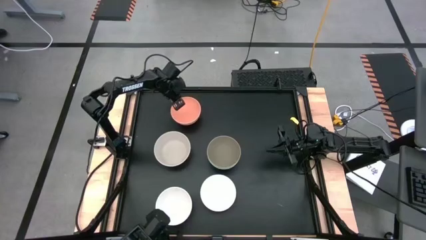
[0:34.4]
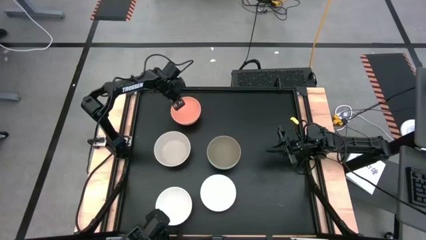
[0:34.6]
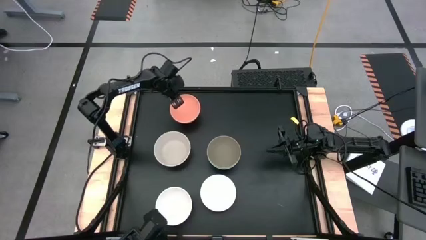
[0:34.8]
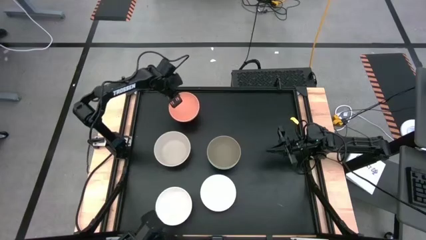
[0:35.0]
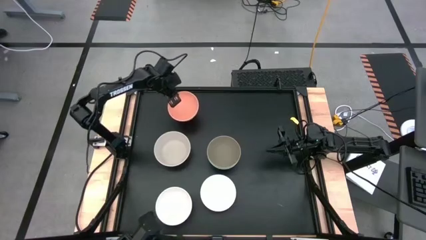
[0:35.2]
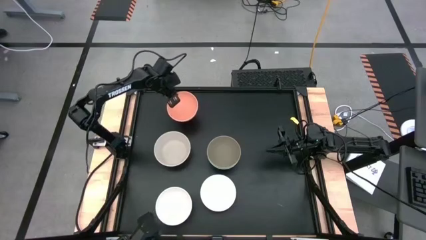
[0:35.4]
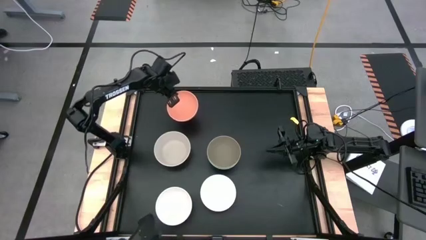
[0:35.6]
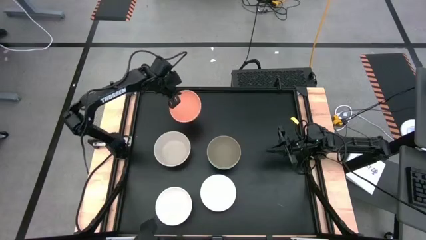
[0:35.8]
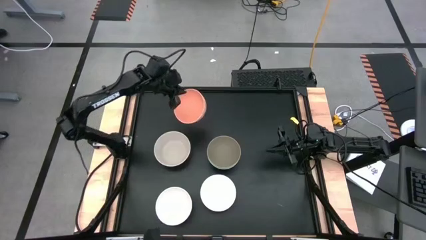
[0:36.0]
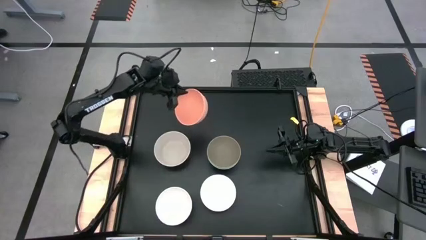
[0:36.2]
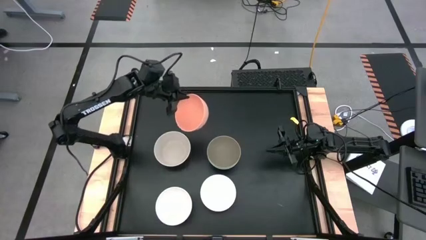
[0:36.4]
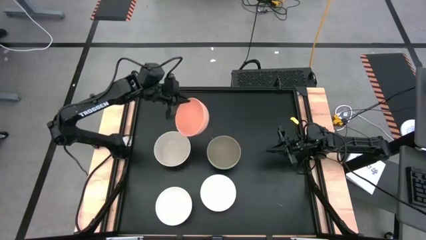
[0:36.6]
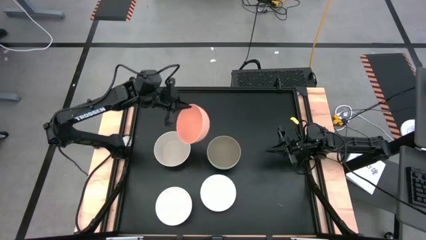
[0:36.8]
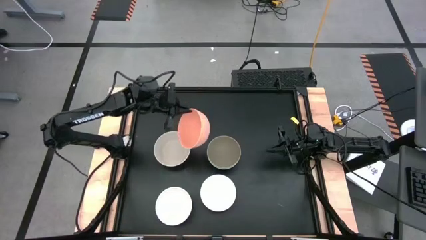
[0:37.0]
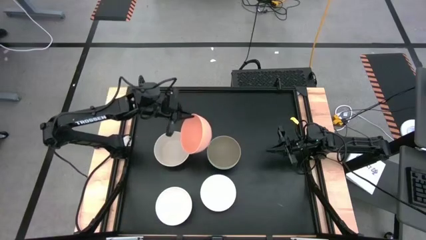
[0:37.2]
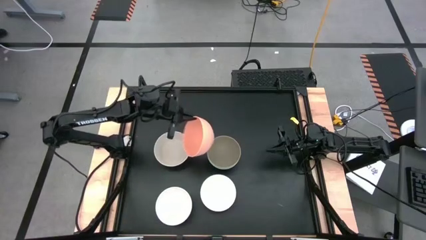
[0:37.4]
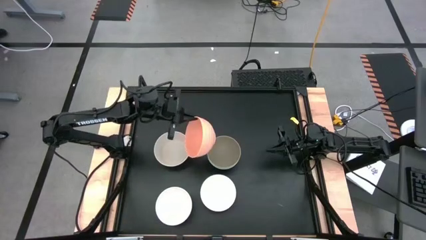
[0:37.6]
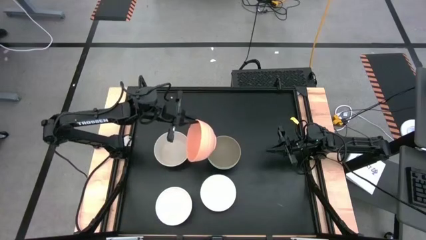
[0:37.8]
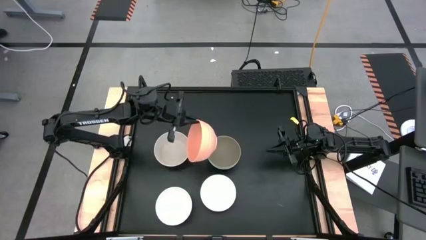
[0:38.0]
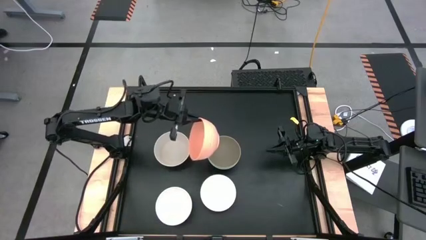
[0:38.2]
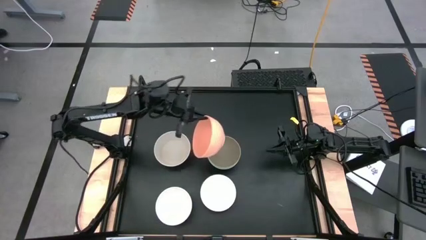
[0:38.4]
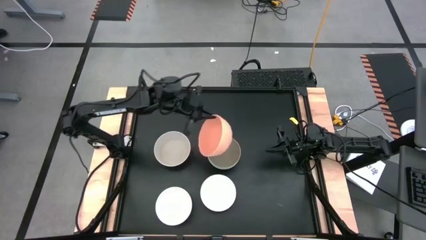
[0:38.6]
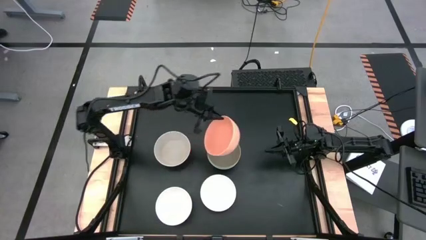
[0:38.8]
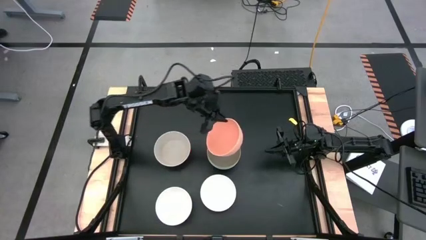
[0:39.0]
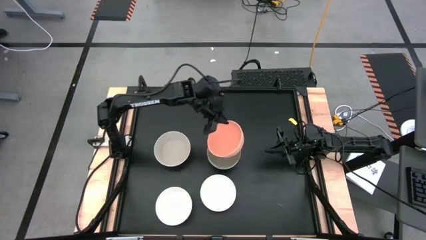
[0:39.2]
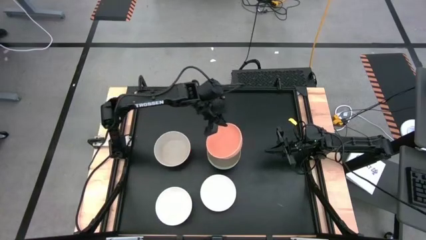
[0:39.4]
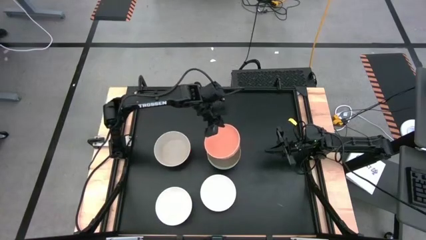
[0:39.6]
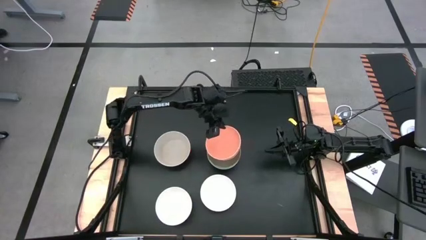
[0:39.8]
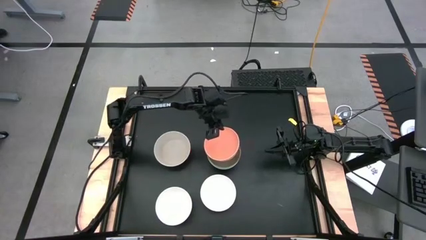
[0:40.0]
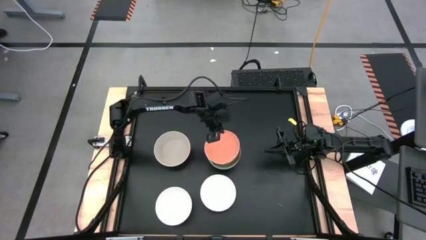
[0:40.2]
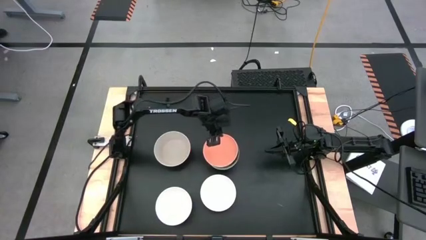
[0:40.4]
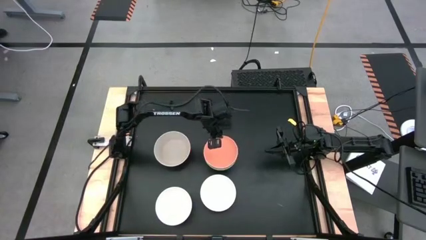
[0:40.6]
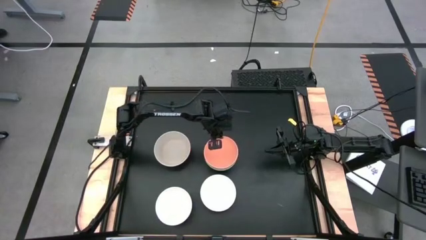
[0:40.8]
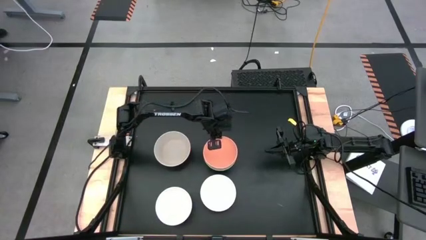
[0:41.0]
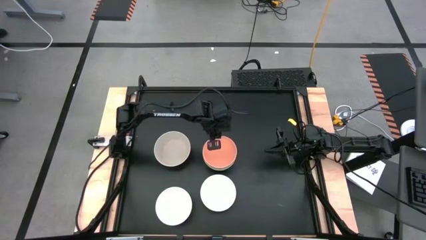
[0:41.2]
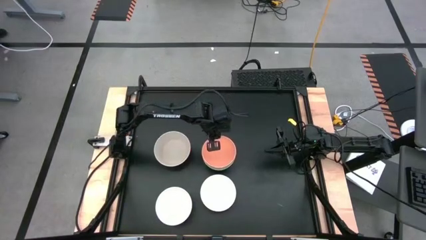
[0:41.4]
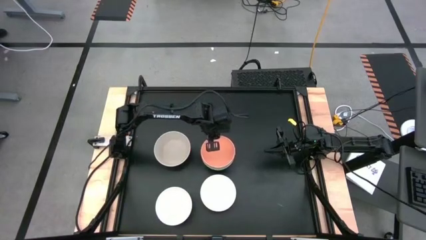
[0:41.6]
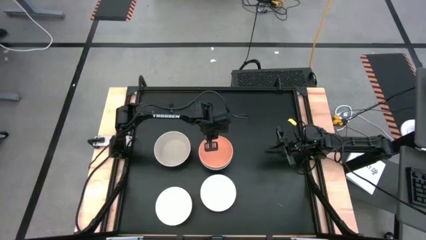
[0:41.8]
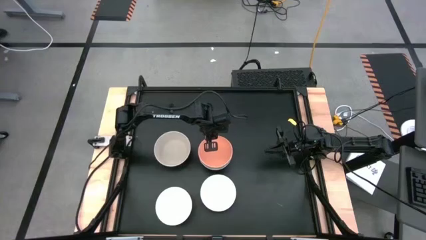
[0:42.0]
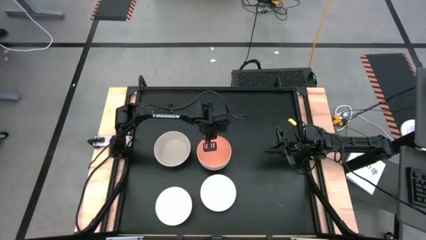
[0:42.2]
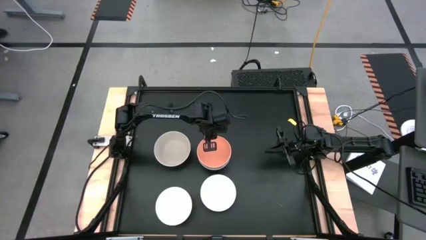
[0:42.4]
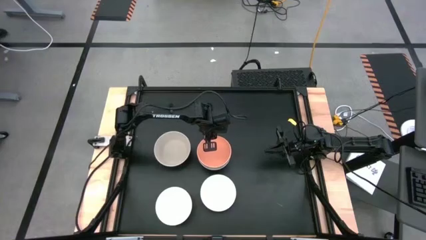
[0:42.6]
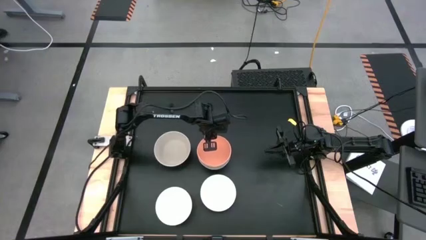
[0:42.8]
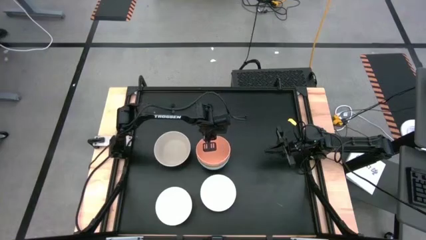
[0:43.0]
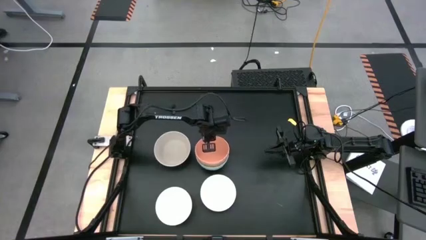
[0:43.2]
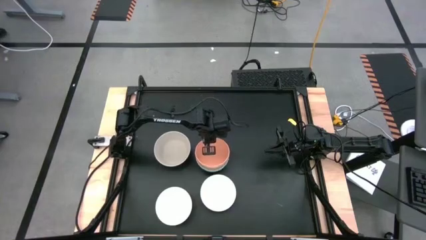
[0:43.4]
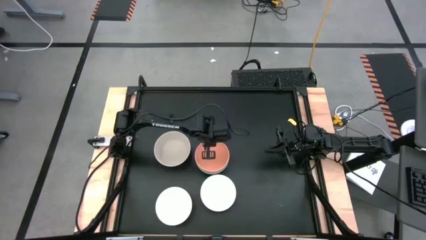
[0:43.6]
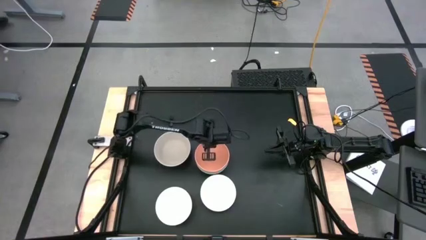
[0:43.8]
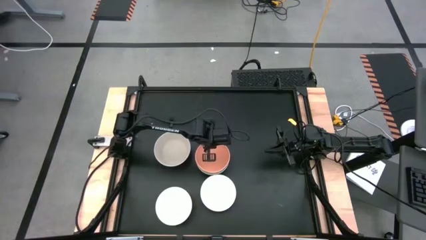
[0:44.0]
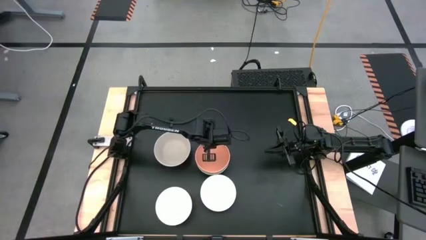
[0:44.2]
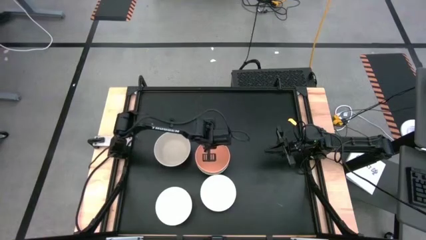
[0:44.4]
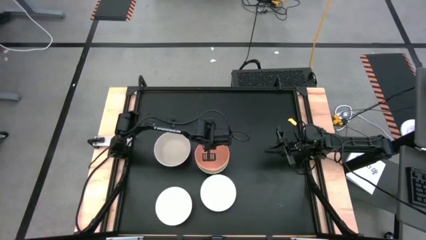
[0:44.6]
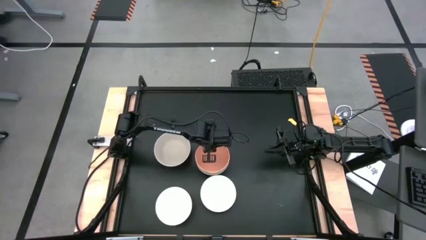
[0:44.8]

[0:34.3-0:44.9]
Task: Nest bowls inside each other
Stack the orange bowl on top of the brown bowl

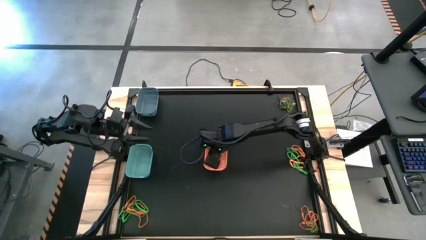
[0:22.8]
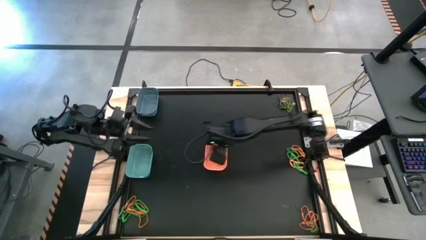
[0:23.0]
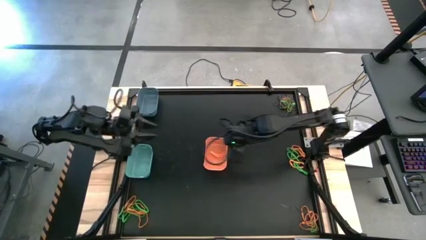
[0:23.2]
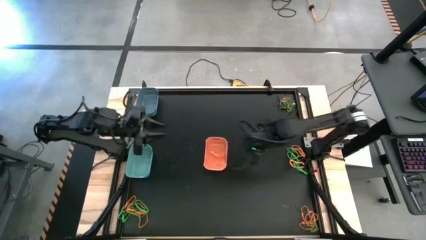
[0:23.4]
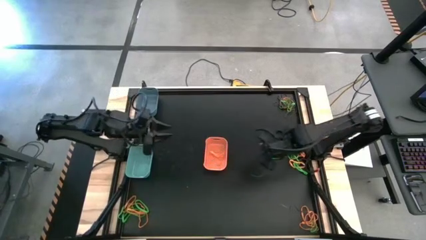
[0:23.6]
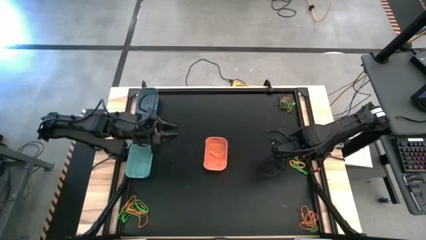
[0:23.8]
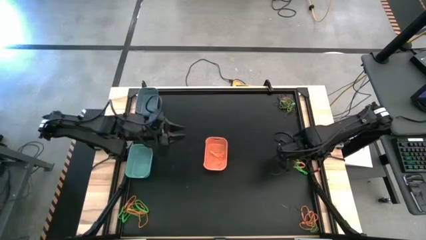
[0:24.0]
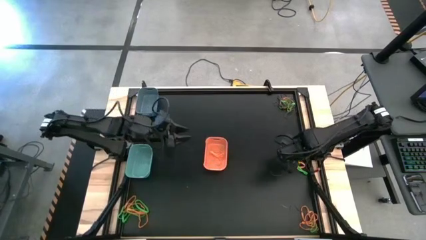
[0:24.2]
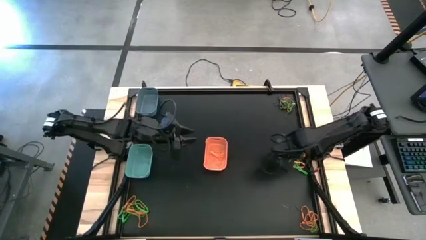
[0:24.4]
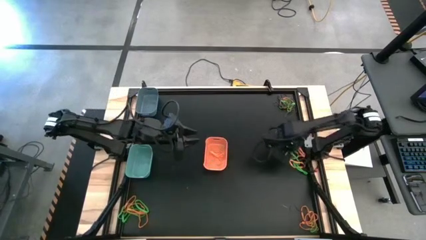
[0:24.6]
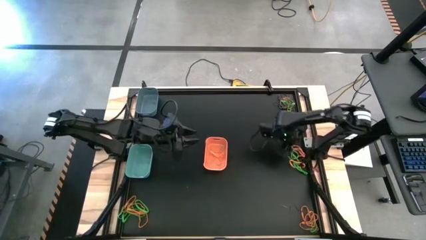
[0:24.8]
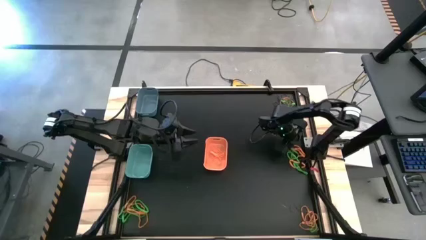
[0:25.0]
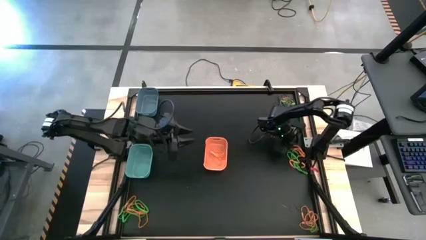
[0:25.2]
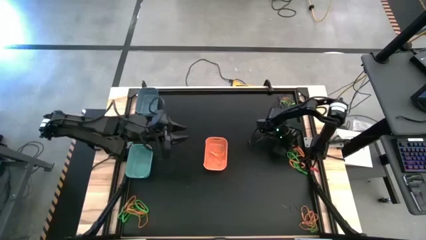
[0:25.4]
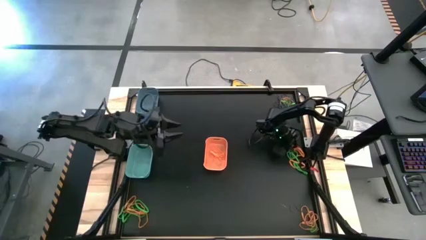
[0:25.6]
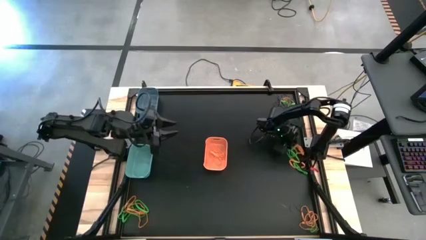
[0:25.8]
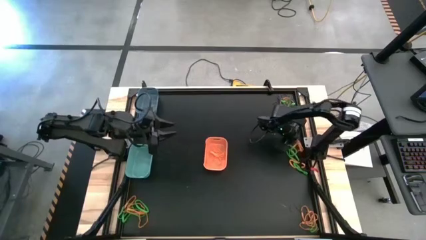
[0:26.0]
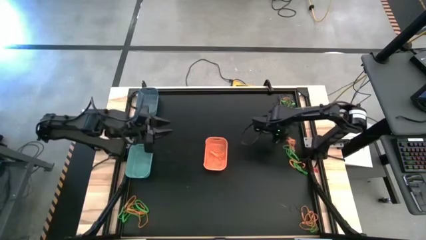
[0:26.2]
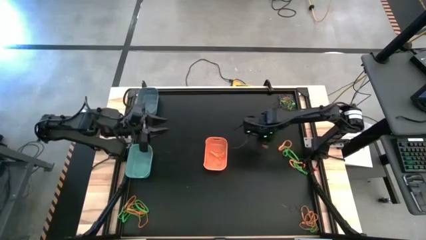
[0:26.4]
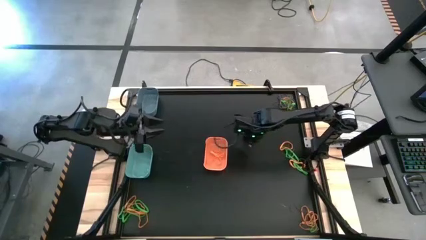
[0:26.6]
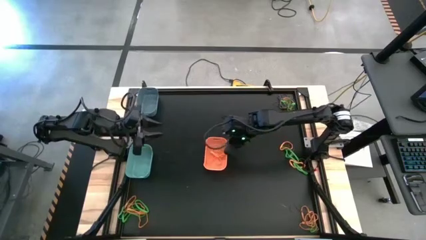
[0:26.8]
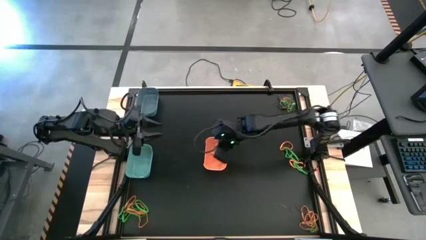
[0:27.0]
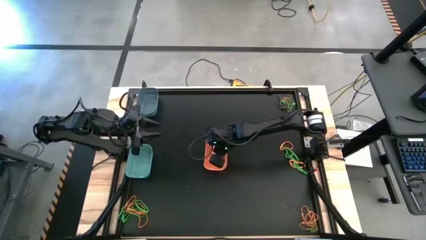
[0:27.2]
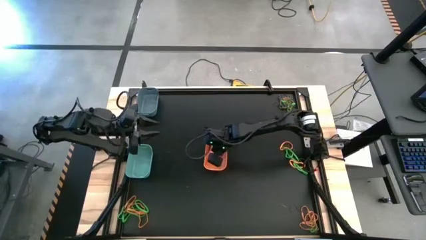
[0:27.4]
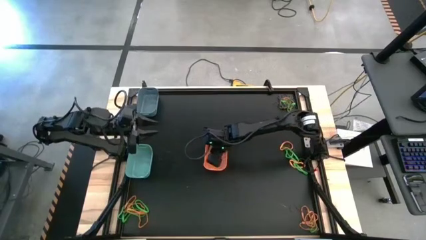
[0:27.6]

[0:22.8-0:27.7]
Task: Sort rubber bands into baskets
Put the orange rubber band into the orange bin

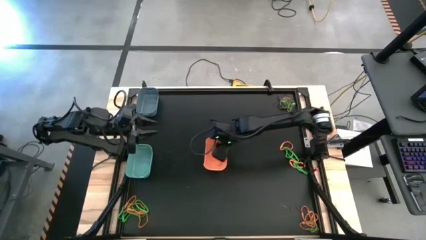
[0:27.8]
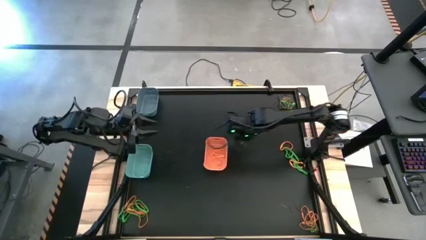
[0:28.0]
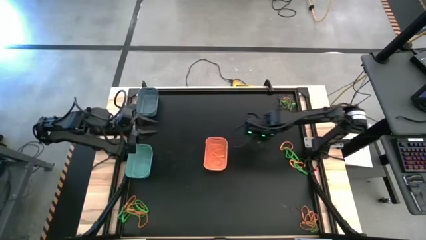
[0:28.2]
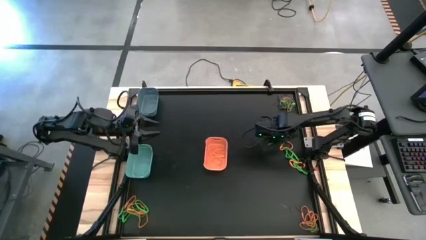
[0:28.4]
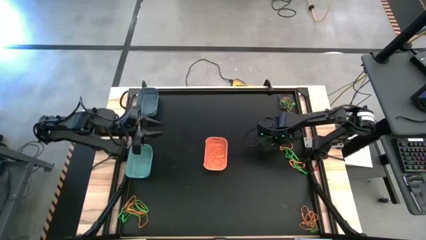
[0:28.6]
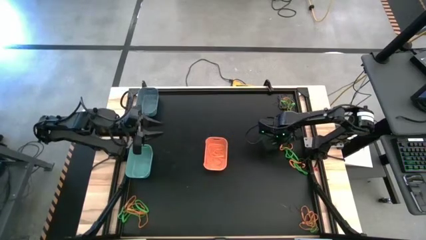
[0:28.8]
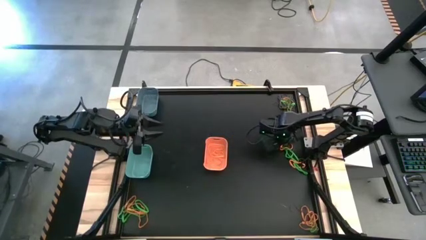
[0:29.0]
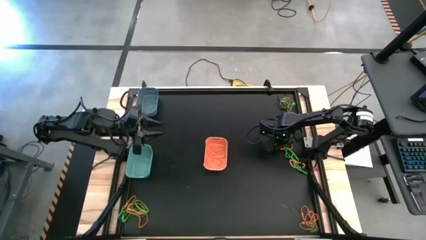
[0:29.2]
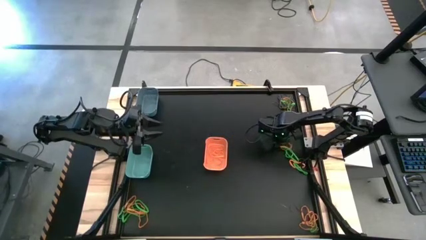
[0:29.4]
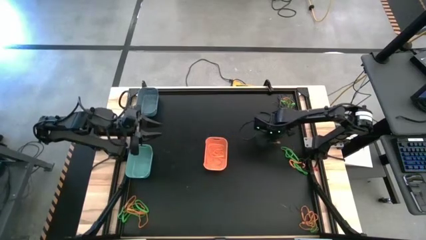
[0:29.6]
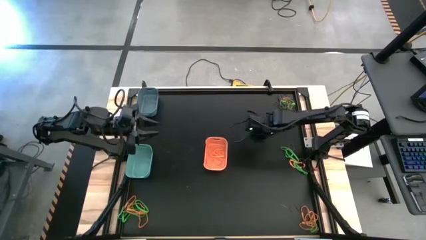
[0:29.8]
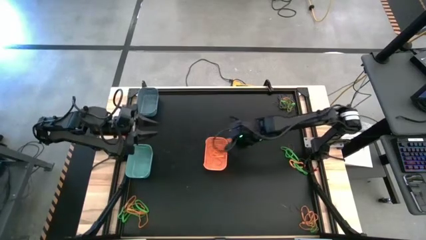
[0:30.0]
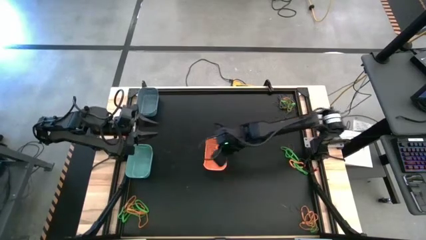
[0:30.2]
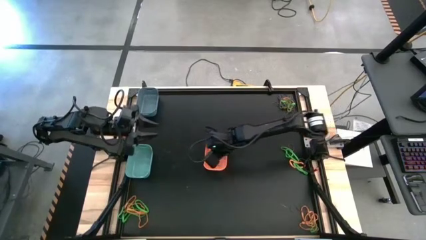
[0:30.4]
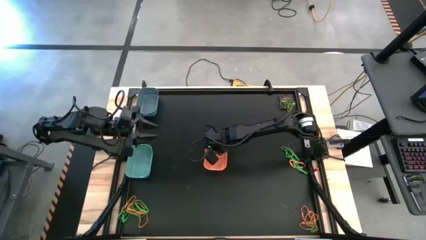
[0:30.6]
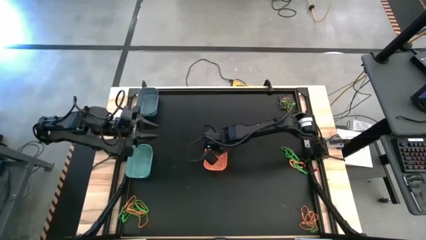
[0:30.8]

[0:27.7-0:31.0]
Put the orange rubber band into the orange bin
